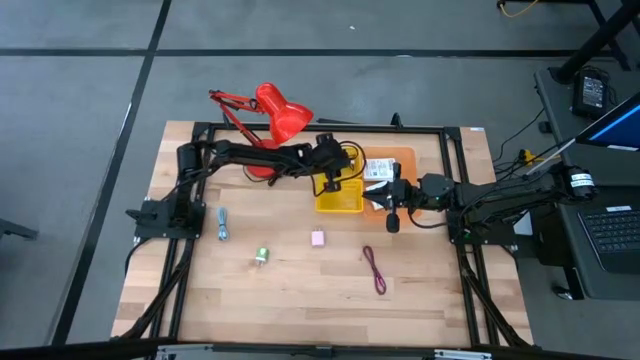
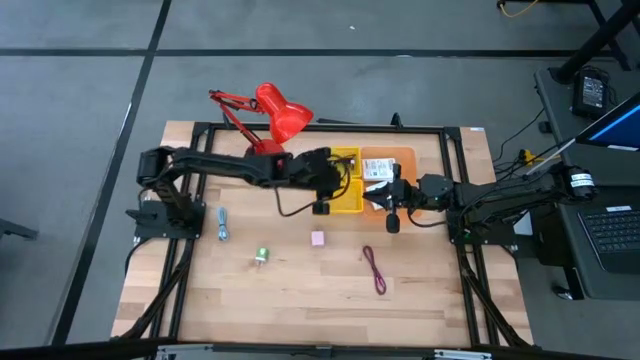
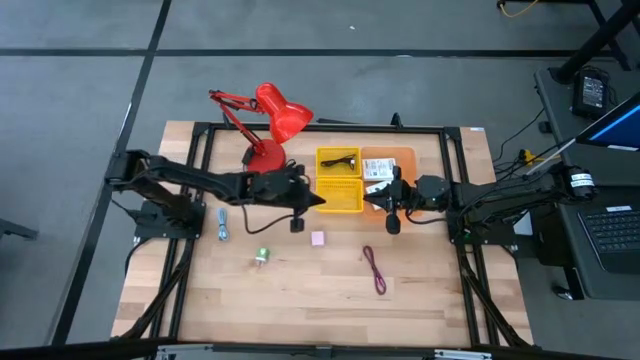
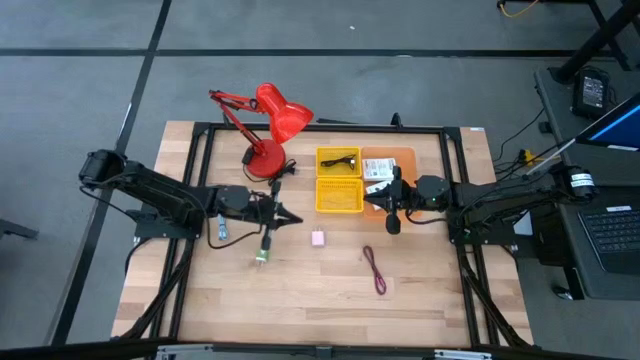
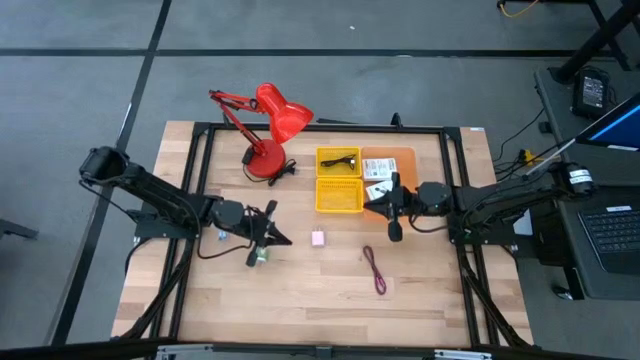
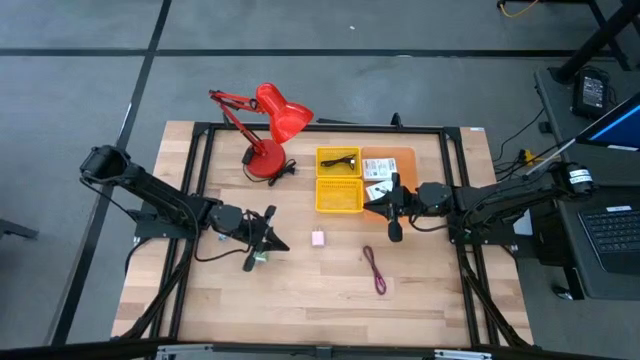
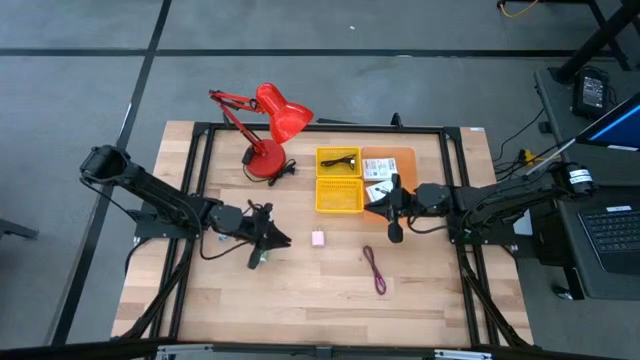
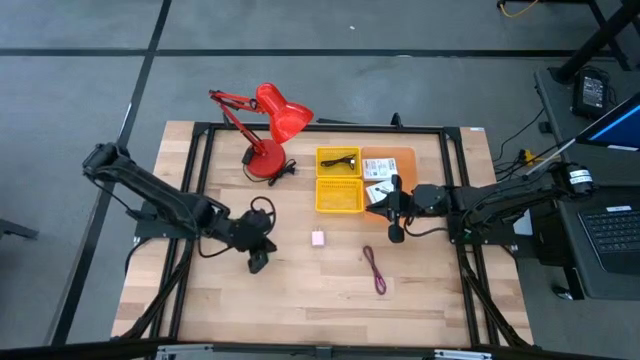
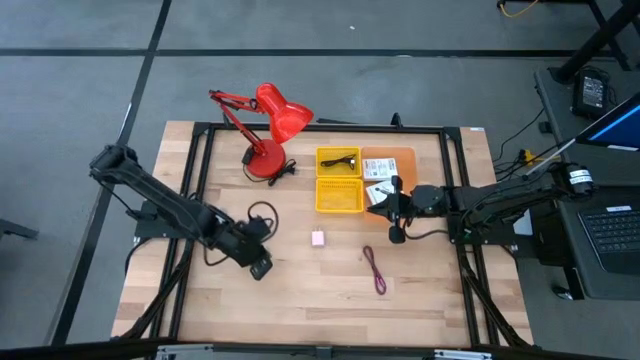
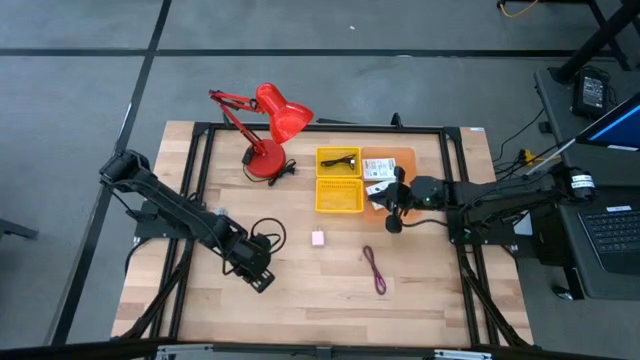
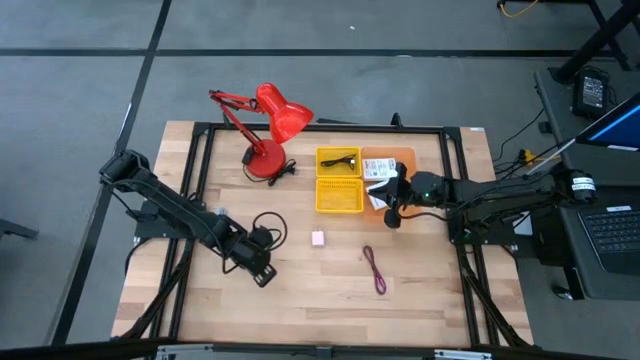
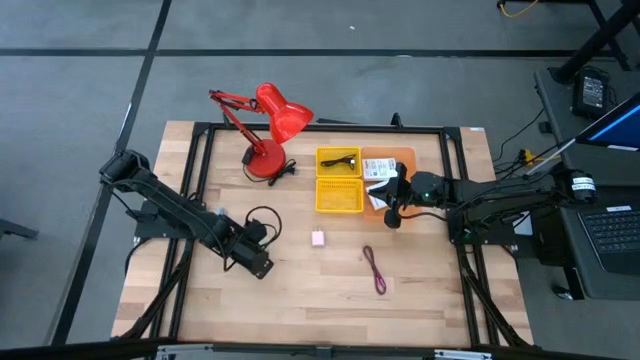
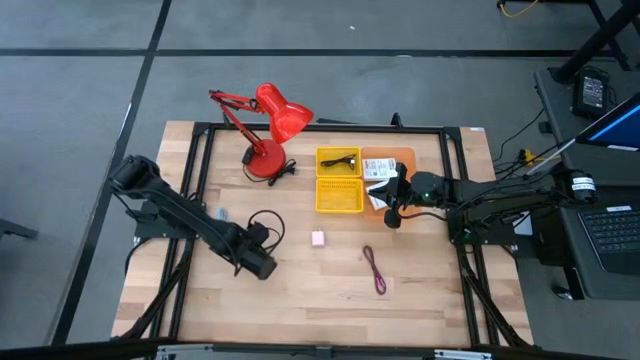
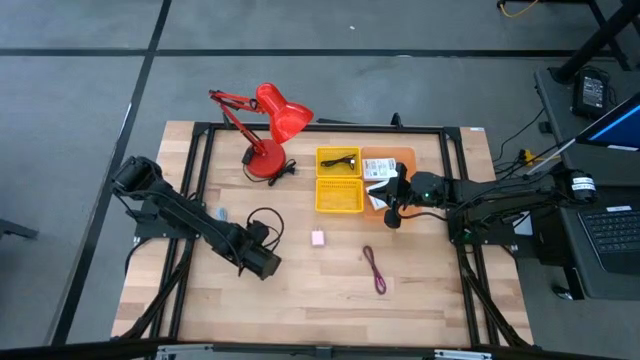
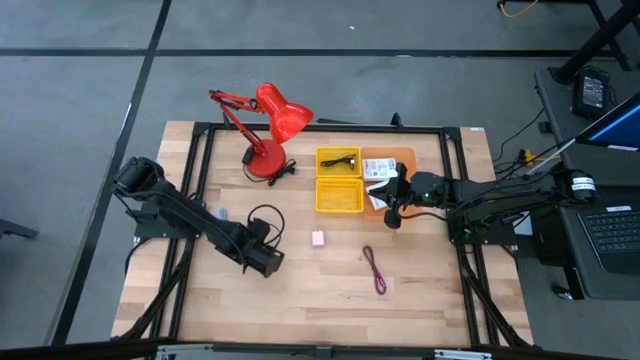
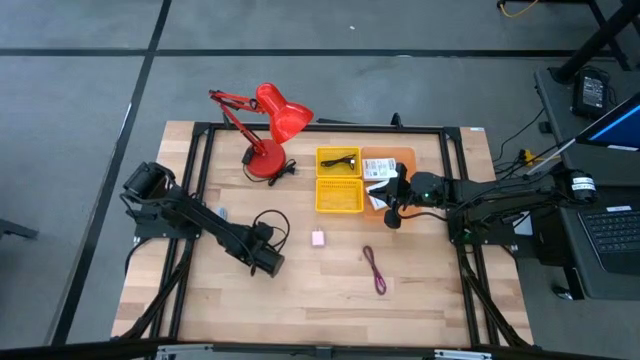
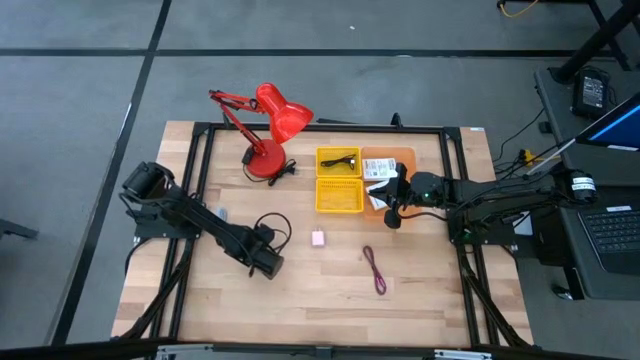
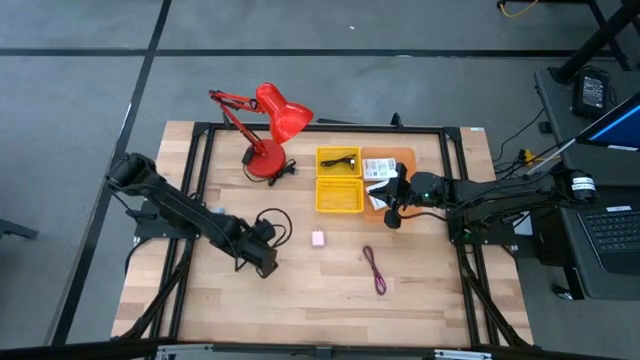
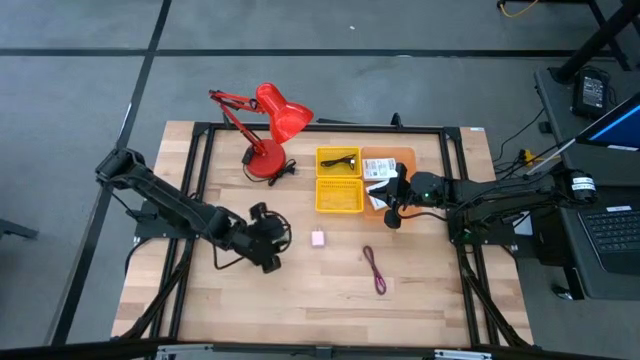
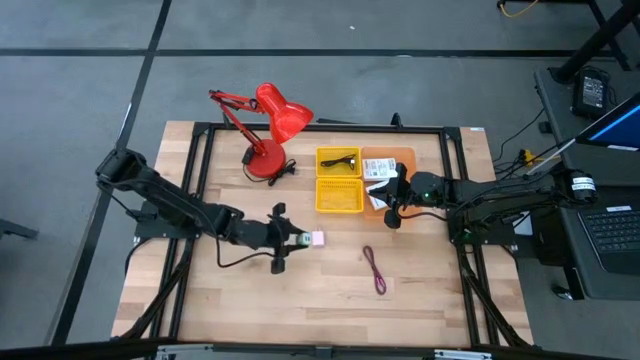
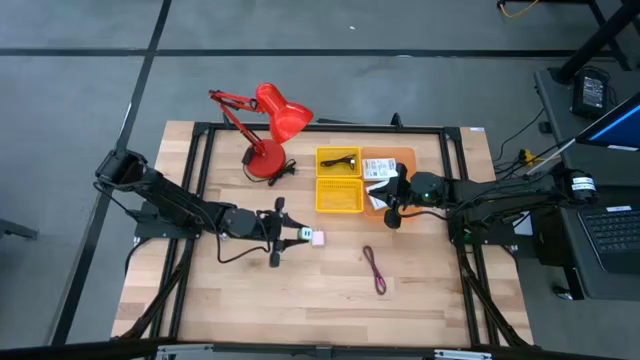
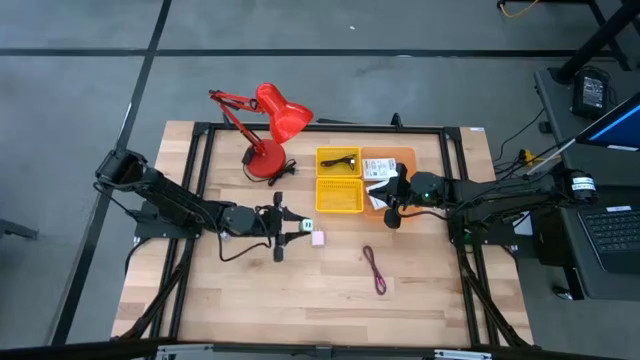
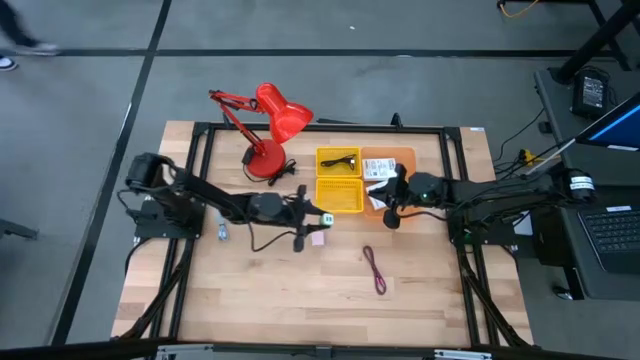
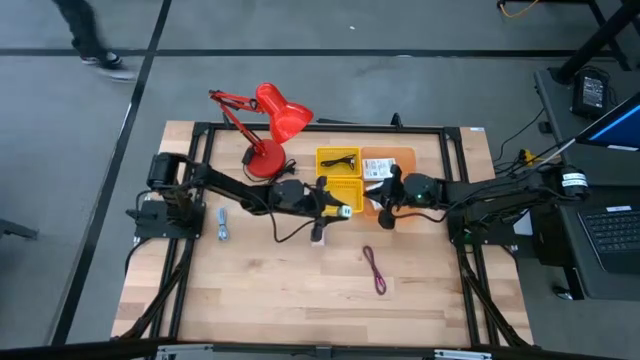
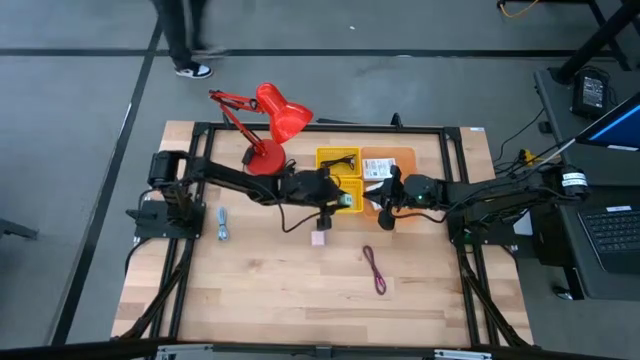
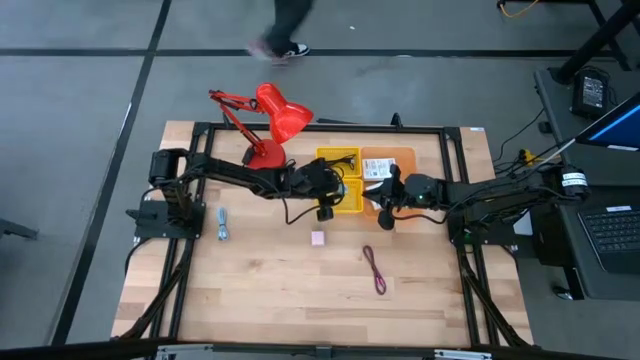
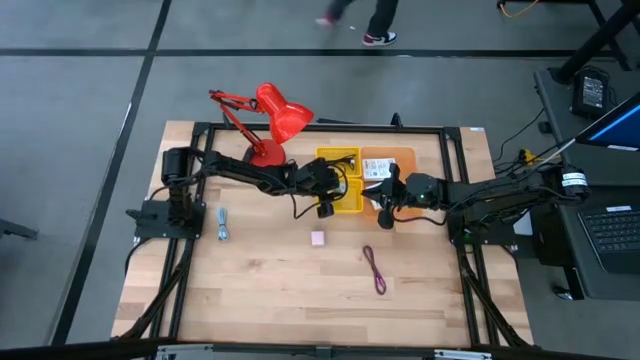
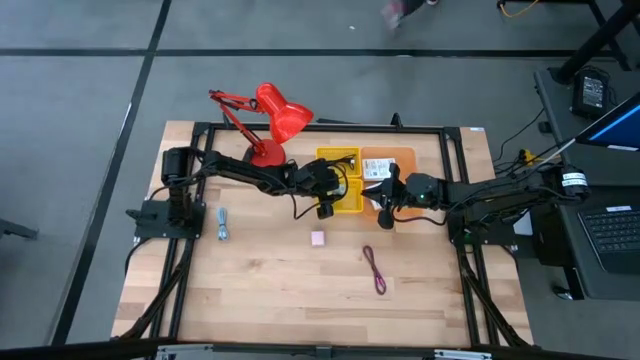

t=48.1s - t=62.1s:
Task: Pick and place items into bin
Put the green charger adapter into the bottom yellow bin

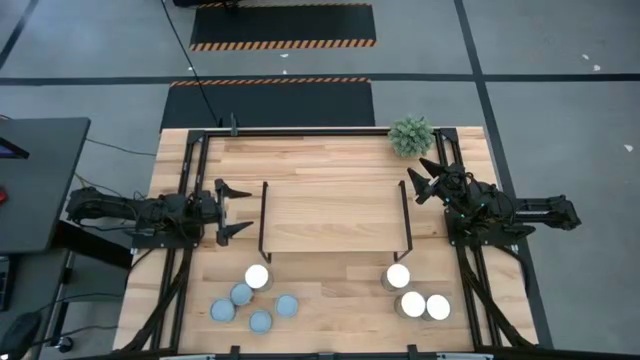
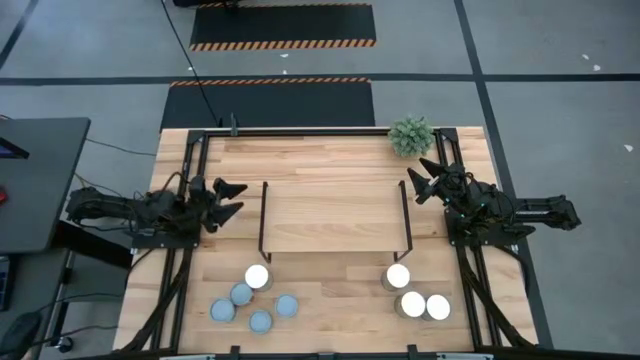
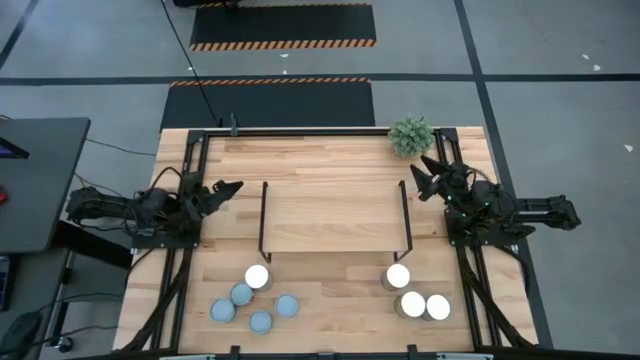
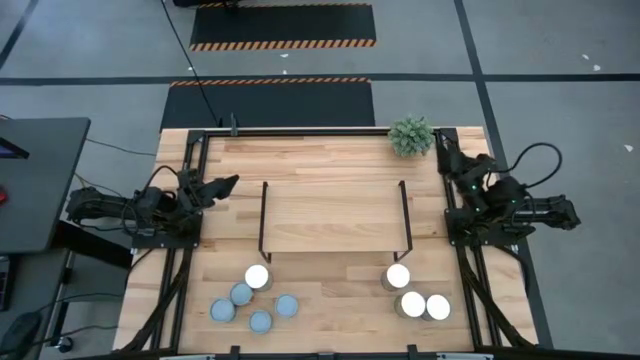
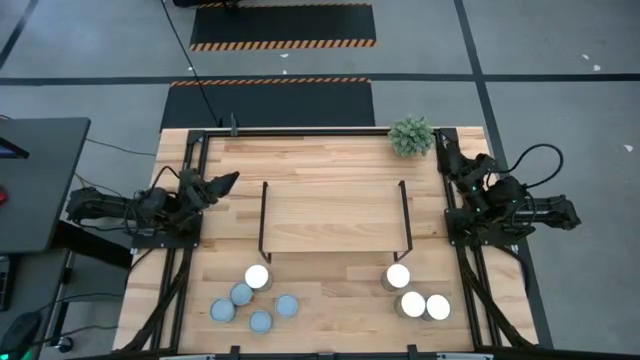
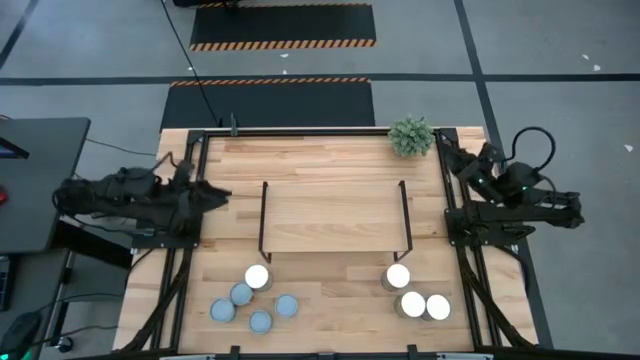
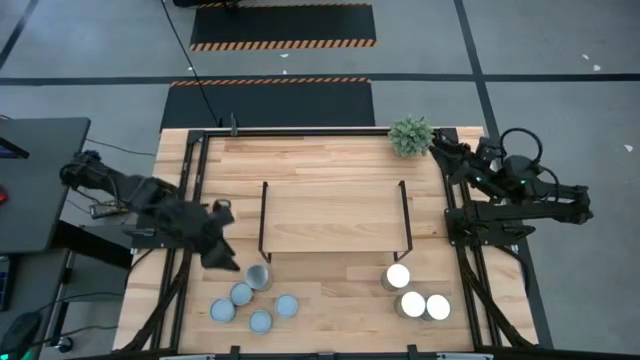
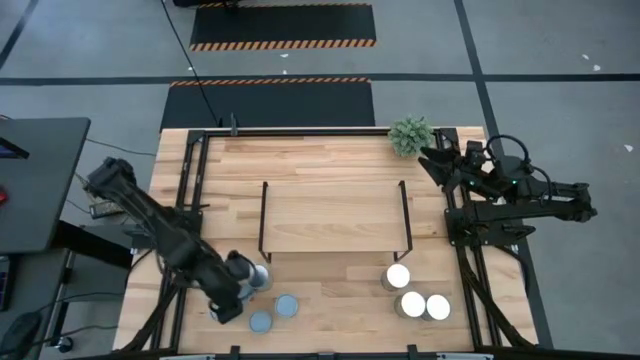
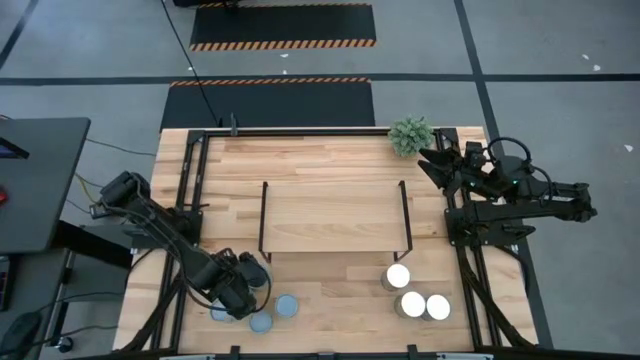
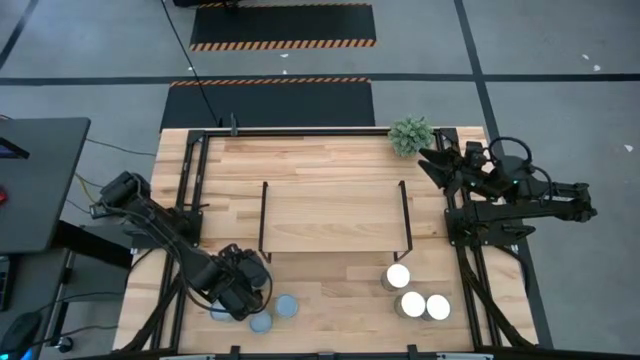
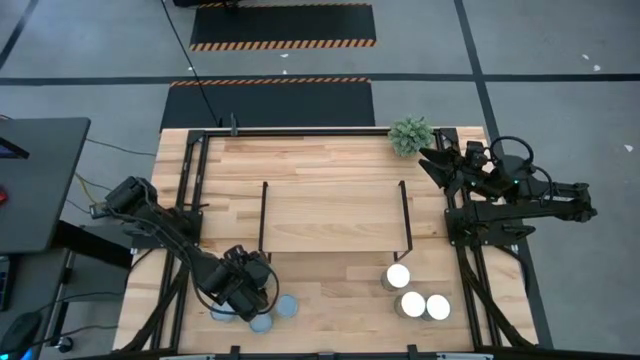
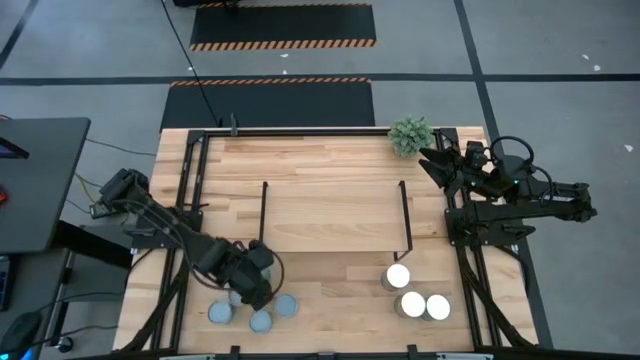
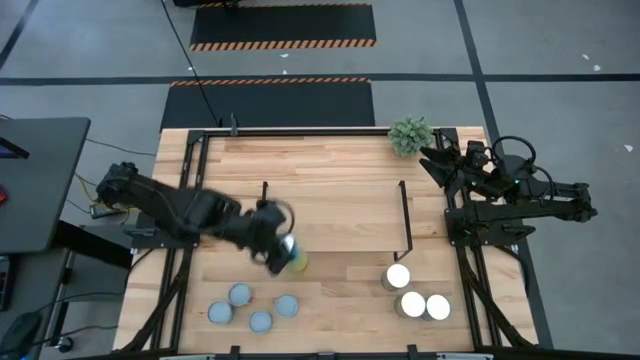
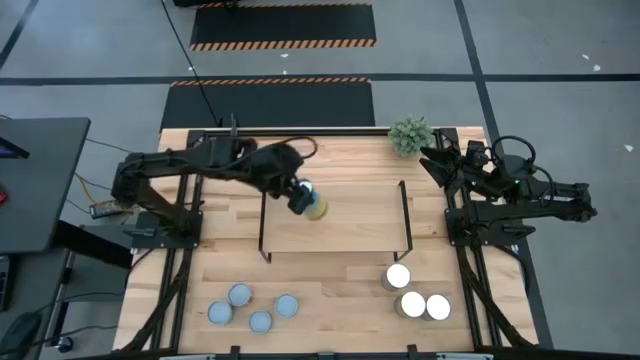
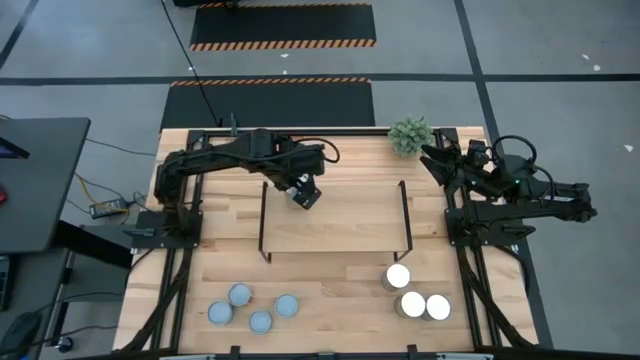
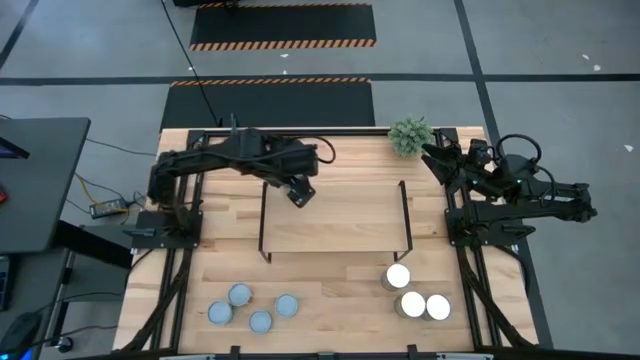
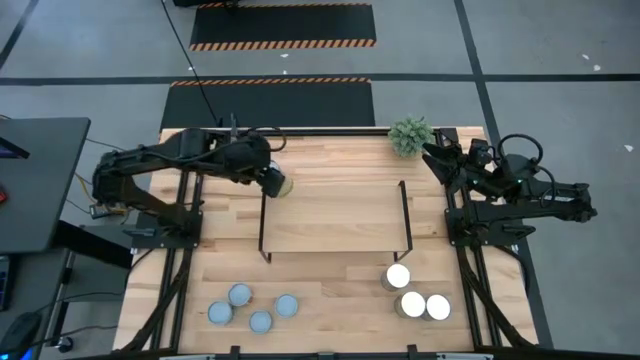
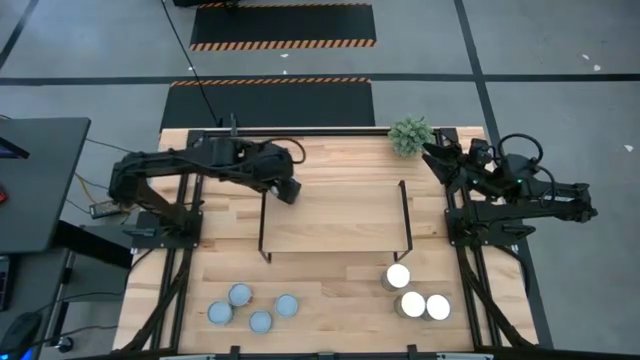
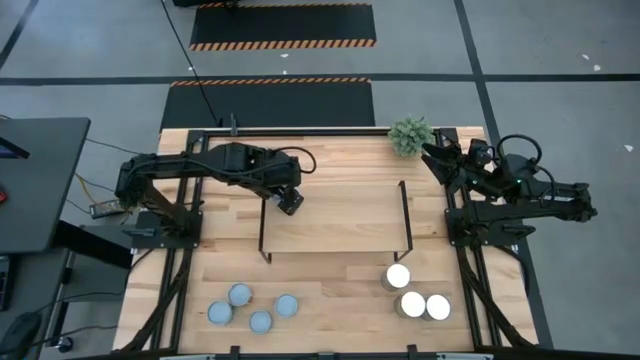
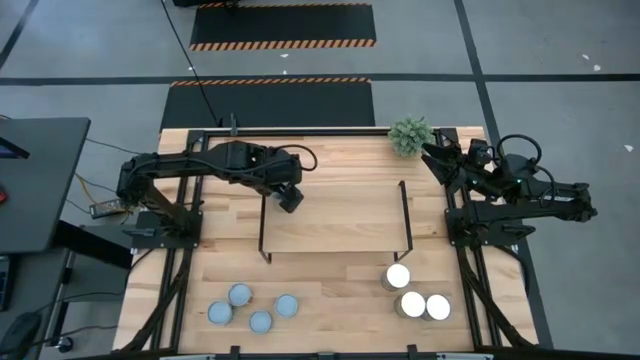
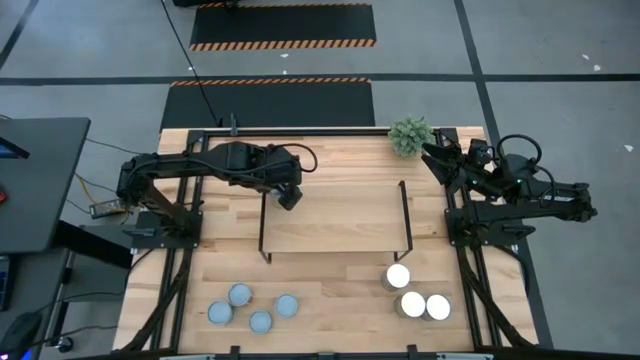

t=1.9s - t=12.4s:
Task: Pick and place cans onto a shelf
Put the canned carrots on the shelf
